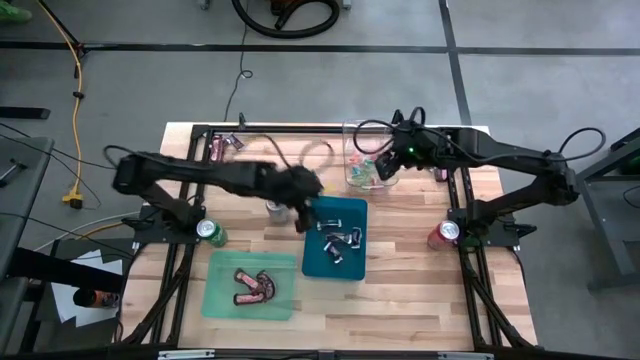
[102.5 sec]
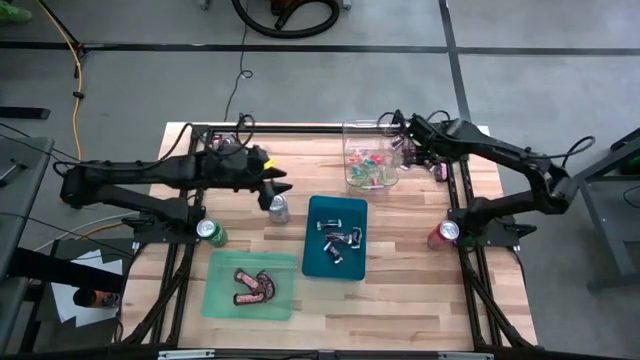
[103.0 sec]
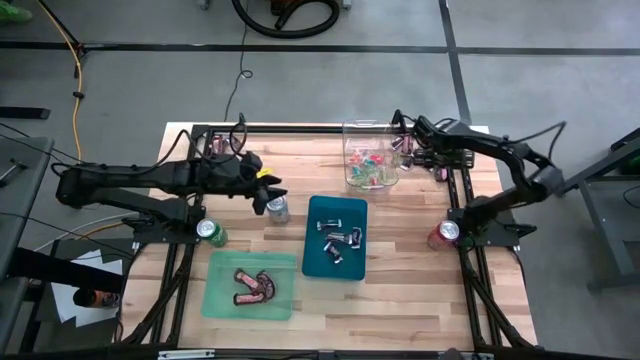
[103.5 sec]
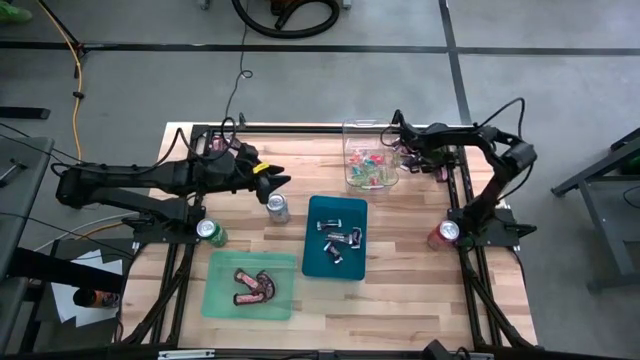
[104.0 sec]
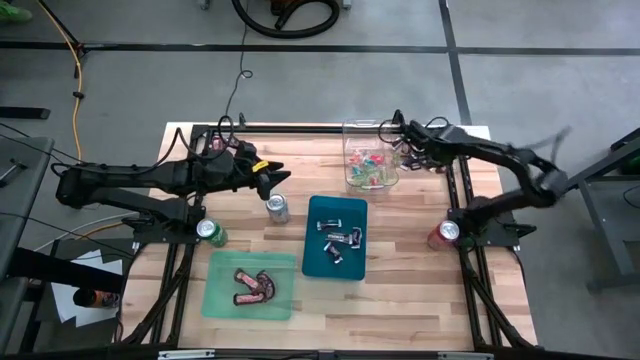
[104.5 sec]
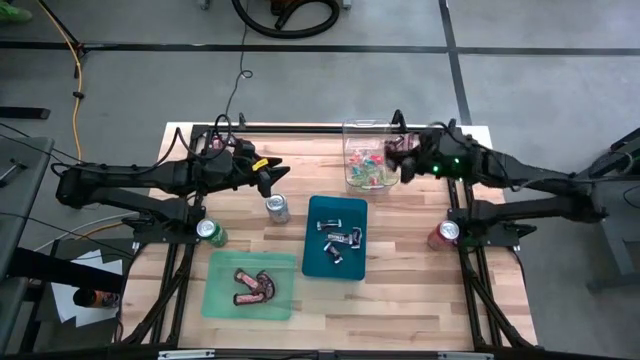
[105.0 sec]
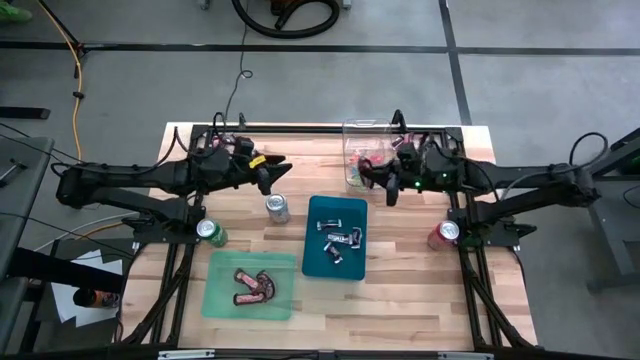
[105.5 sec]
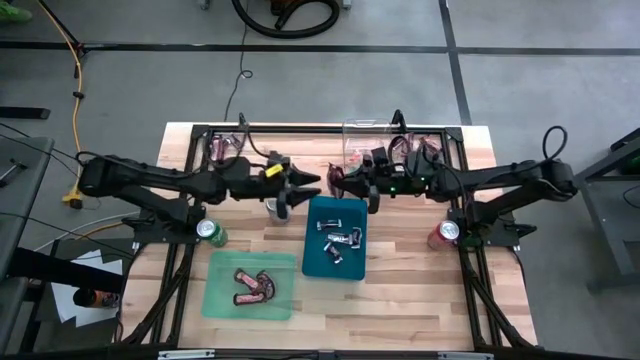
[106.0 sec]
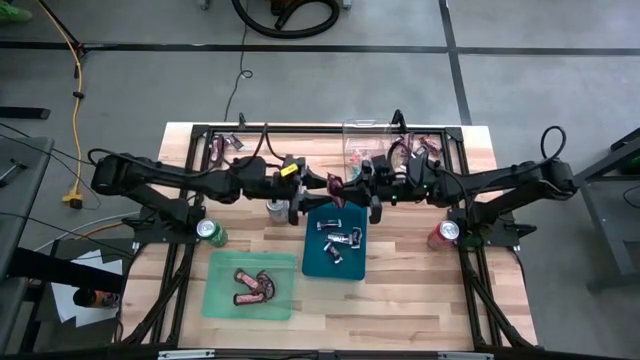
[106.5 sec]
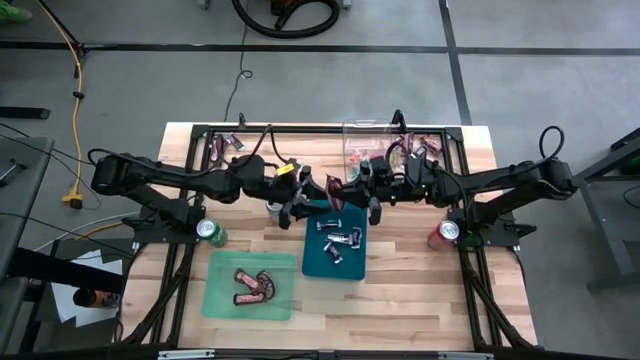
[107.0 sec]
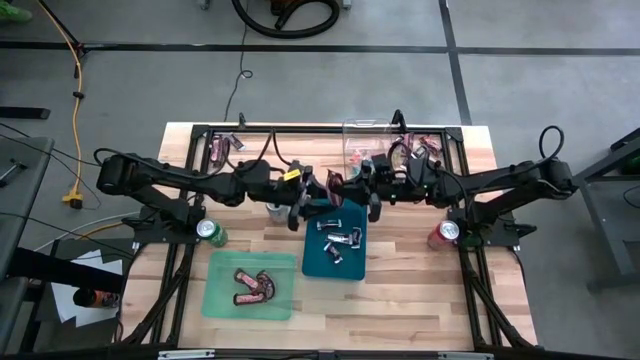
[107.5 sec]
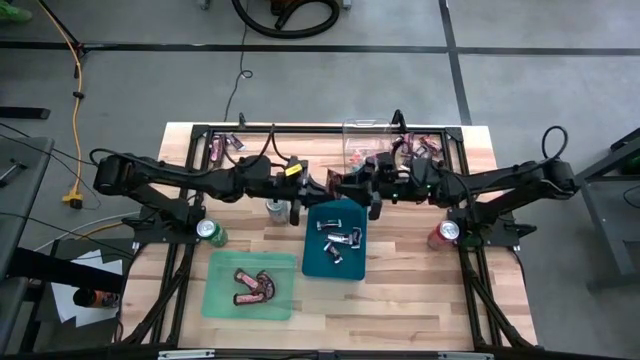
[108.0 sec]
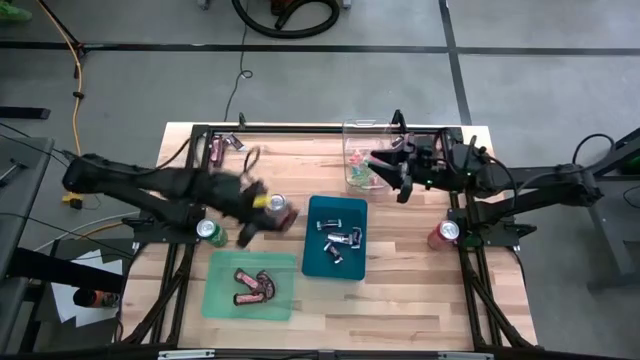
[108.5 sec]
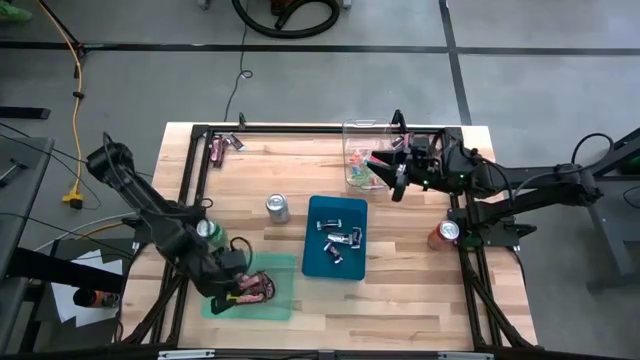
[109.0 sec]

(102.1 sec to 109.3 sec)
Task: Sort candy
Put the brown chocolate into the green bin

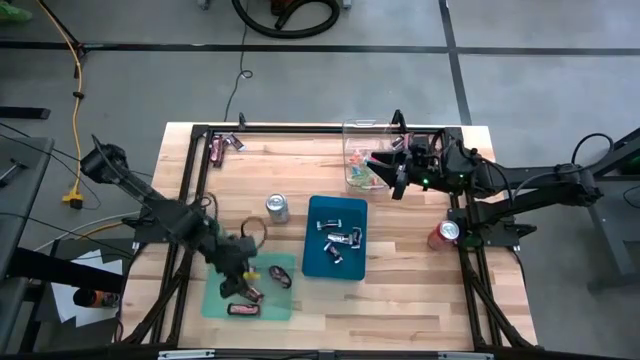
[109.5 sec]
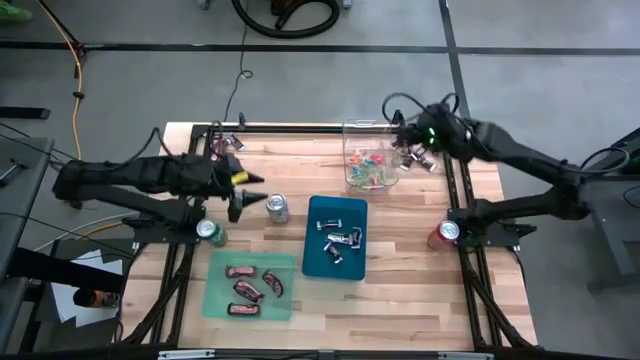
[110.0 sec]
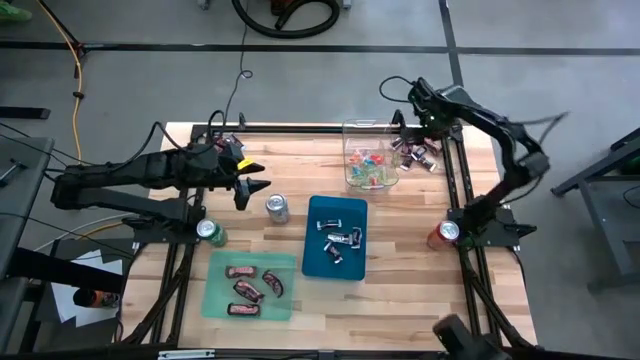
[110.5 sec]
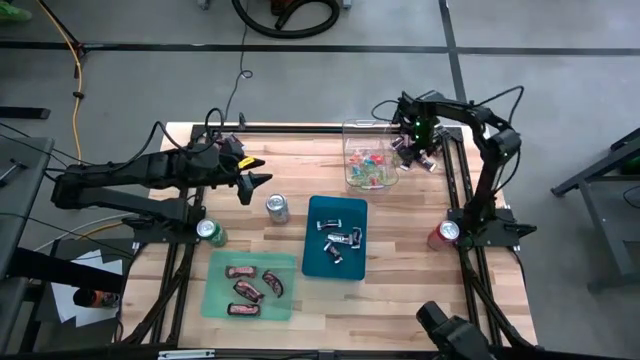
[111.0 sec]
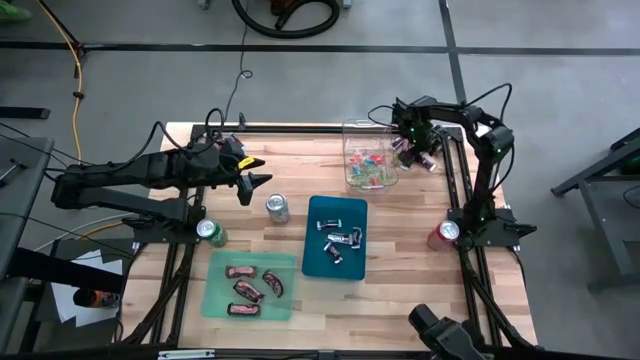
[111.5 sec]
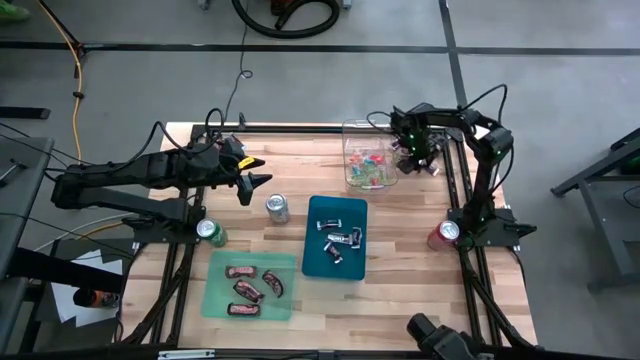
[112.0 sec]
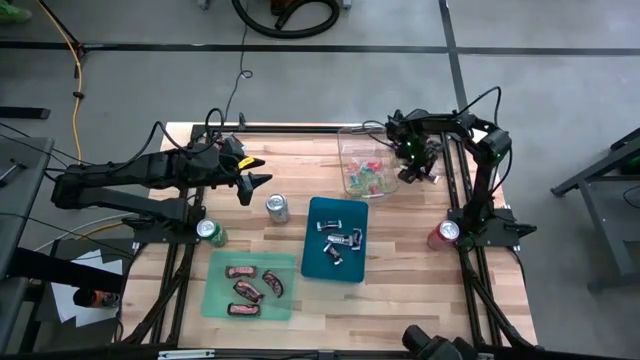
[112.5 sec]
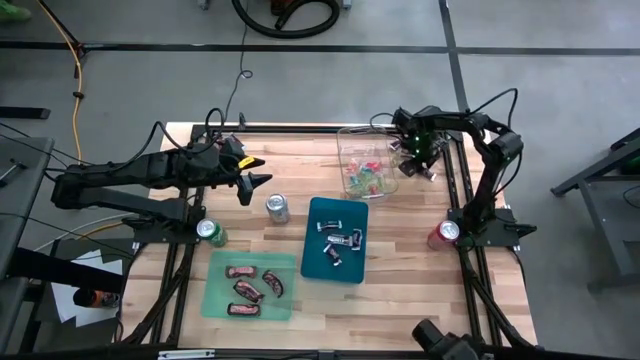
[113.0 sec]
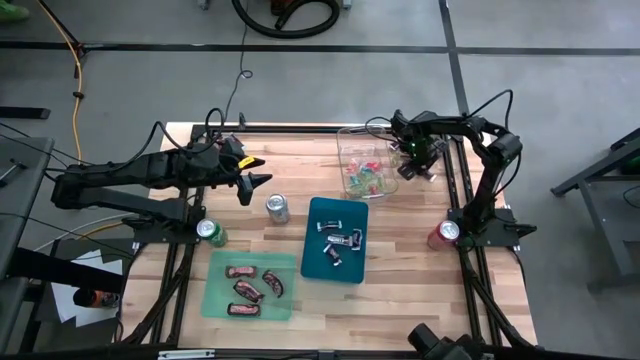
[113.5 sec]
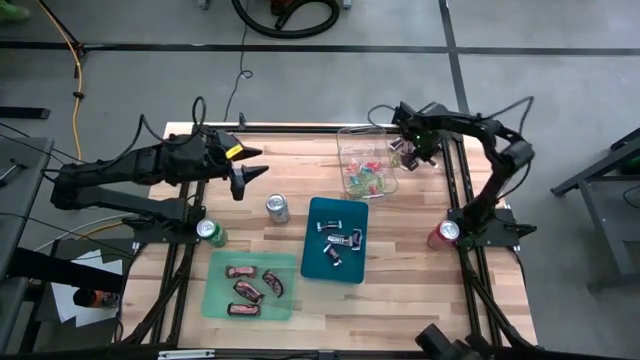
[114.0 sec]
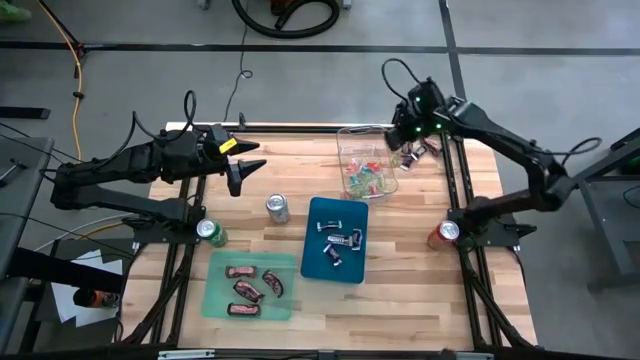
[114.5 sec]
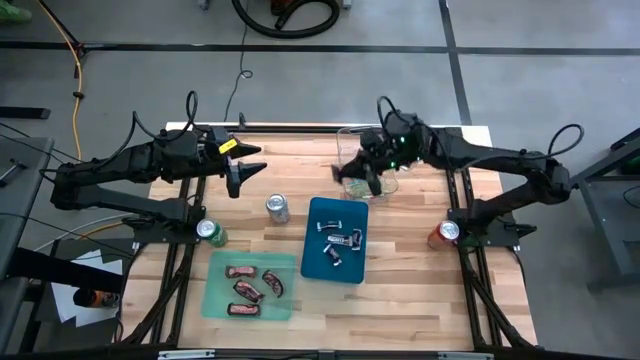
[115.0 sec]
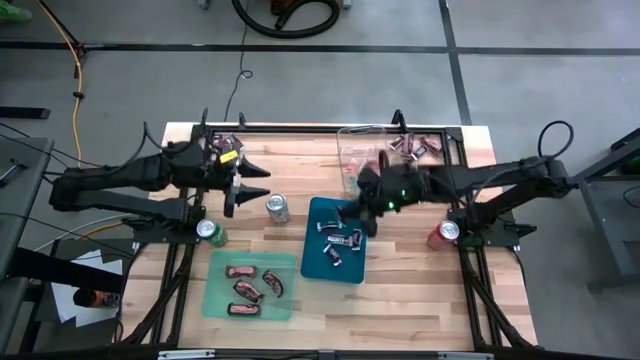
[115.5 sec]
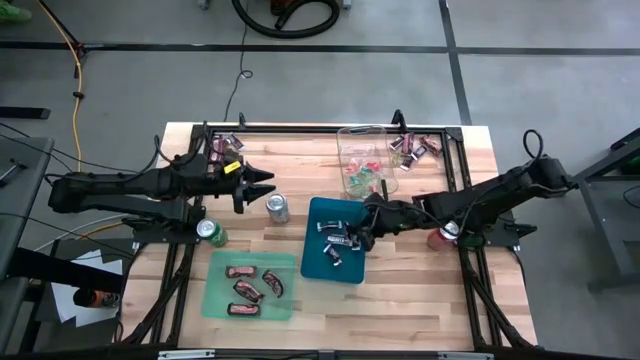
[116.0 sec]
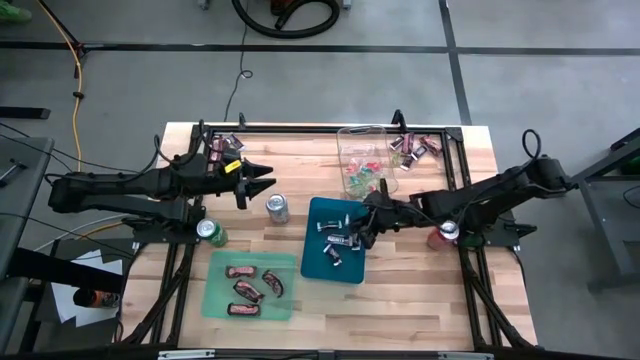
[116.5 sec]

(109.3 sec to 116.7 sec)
Put the brown-white chocolate into the blue bin

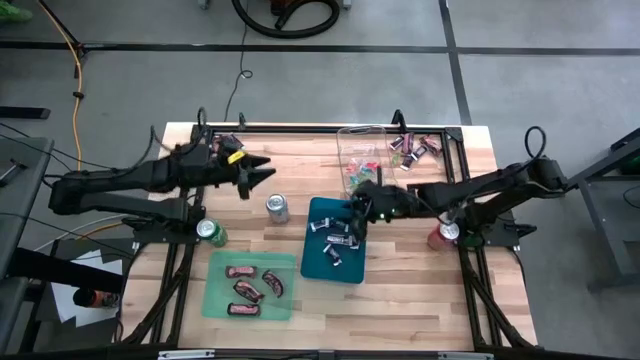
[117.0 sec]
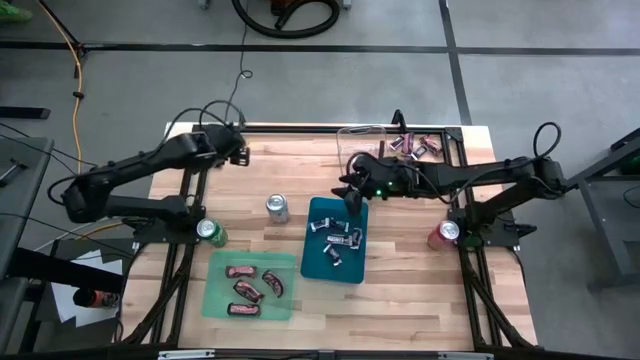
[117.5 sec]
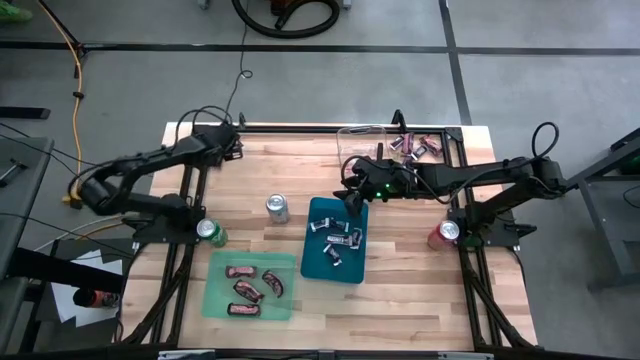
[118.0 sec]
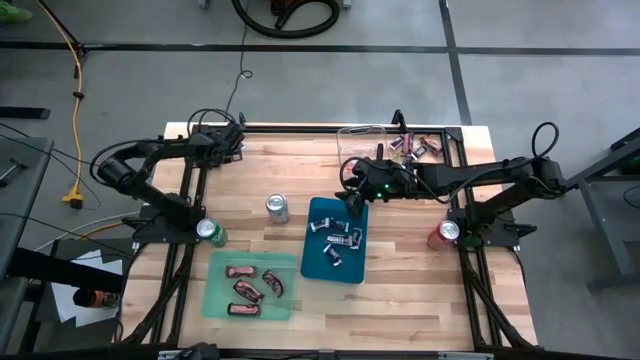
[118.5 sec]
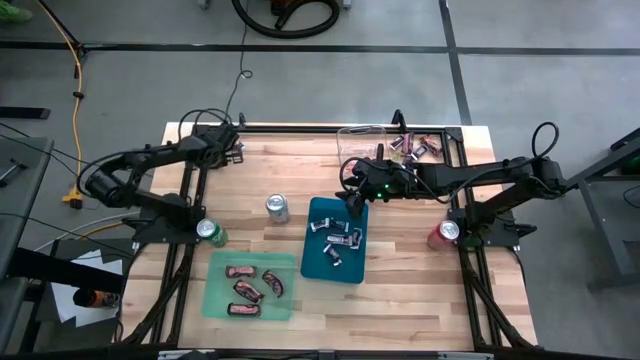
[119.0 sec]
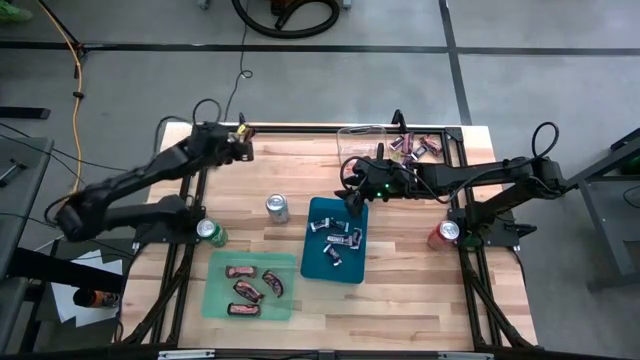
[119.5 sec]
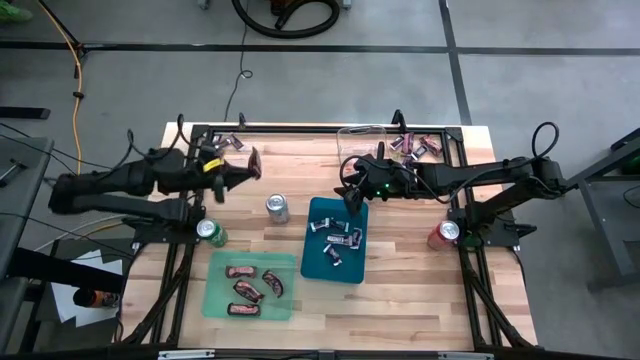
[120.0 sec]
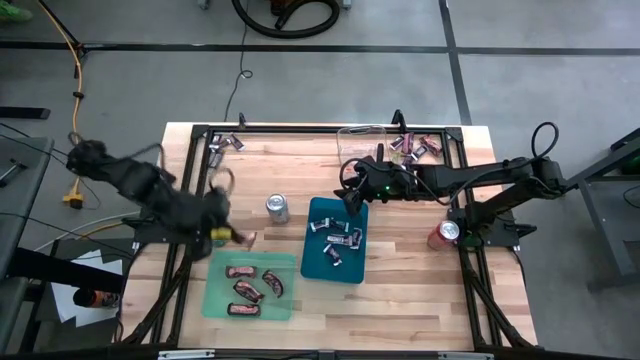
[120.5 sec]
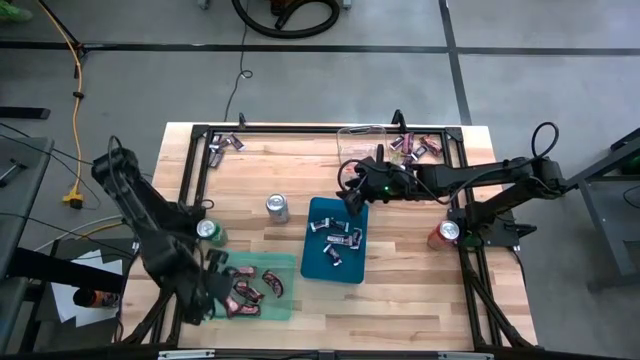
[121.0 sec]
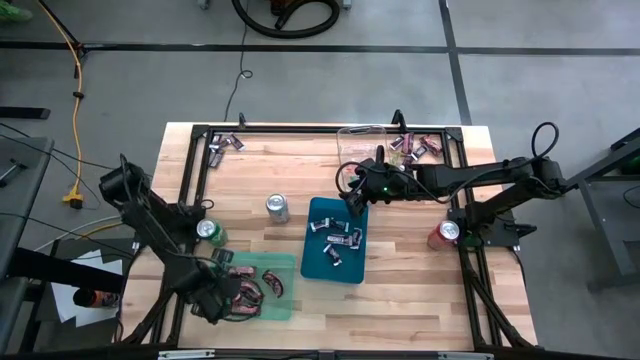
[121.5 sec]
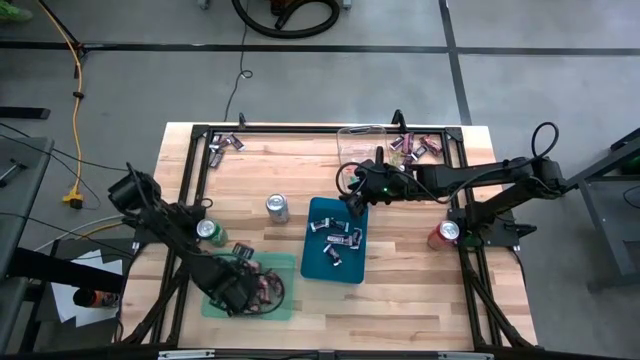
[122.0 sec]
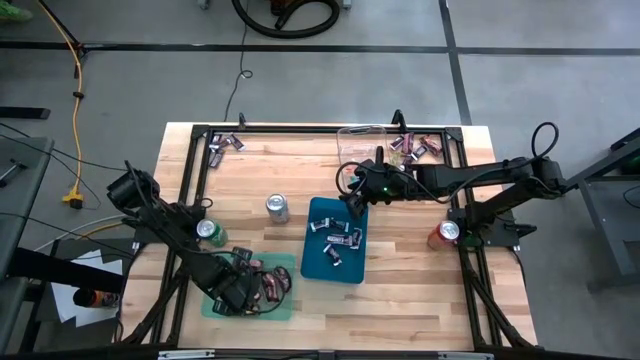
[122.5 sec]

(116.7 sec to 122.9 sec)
Put the brown chocolate into the green bin
